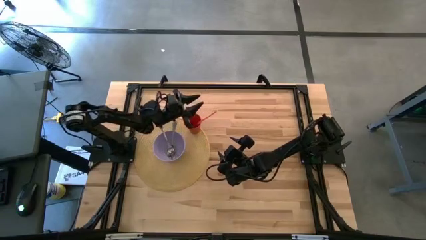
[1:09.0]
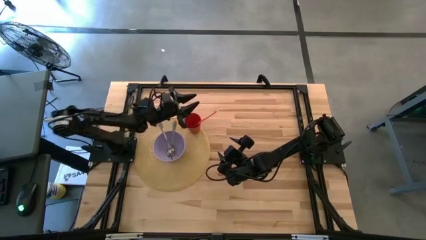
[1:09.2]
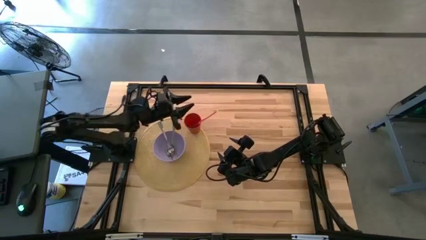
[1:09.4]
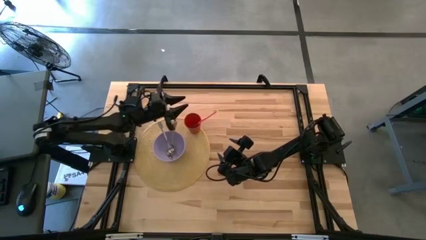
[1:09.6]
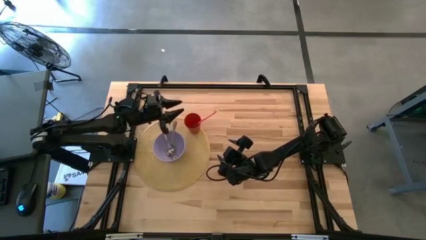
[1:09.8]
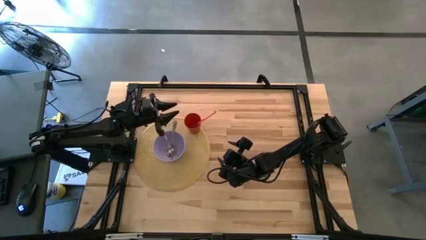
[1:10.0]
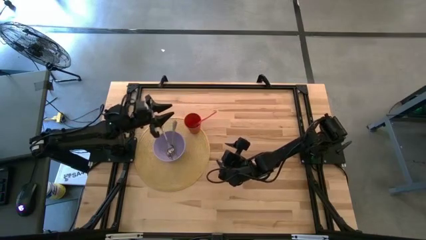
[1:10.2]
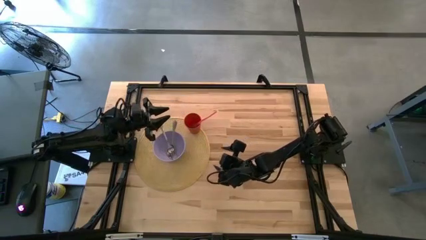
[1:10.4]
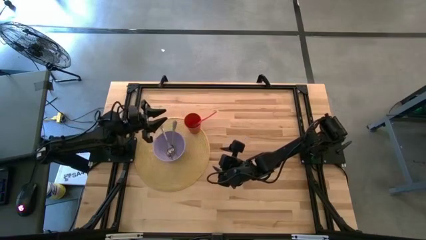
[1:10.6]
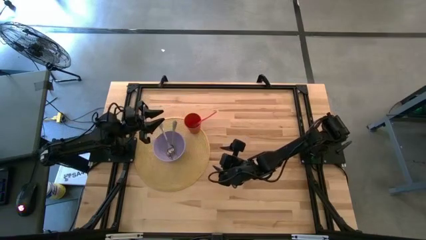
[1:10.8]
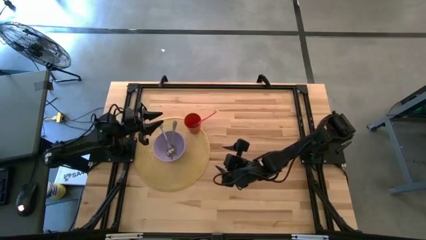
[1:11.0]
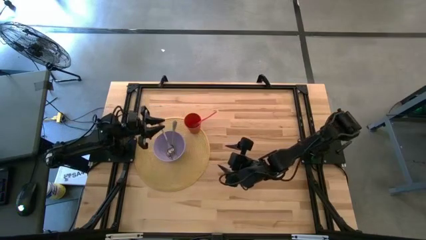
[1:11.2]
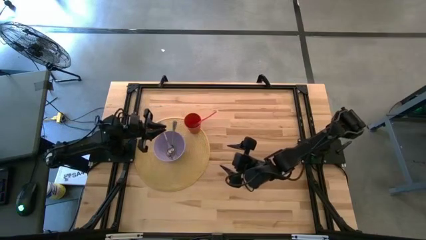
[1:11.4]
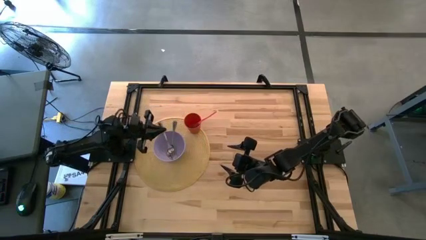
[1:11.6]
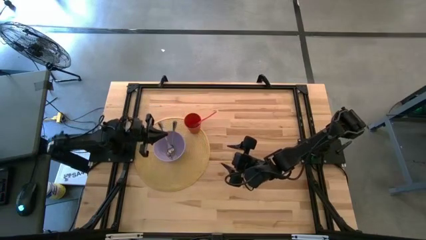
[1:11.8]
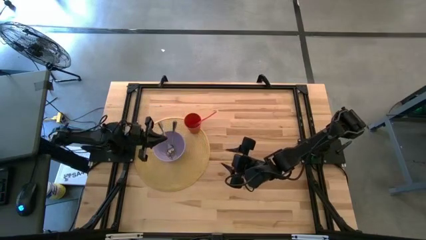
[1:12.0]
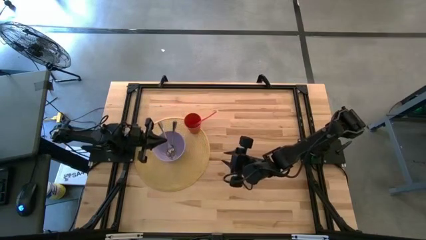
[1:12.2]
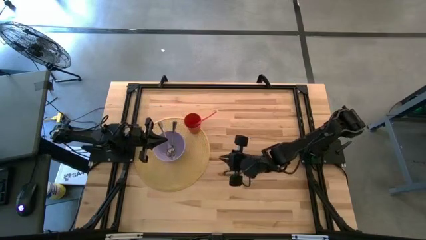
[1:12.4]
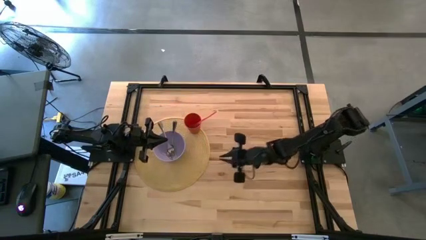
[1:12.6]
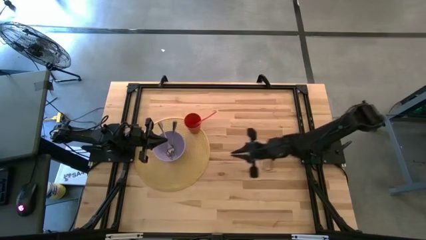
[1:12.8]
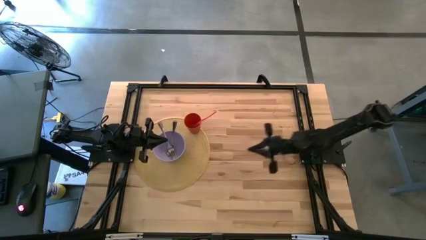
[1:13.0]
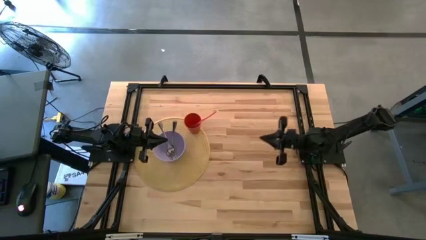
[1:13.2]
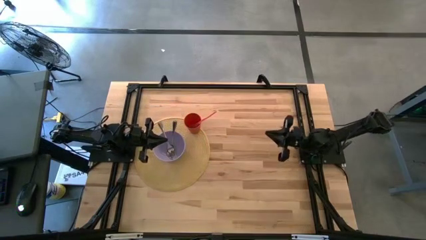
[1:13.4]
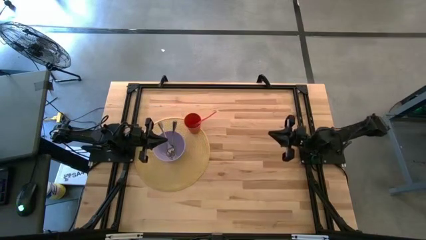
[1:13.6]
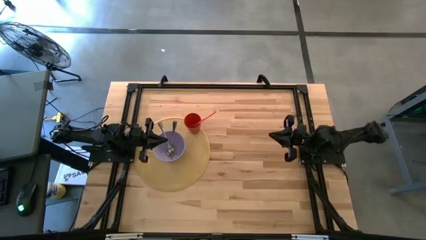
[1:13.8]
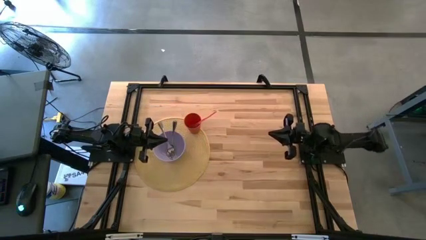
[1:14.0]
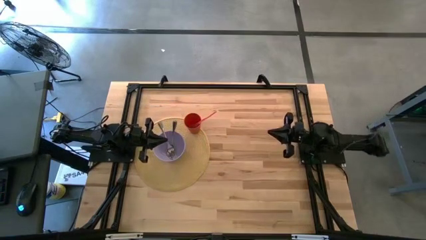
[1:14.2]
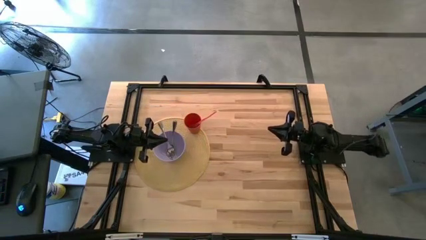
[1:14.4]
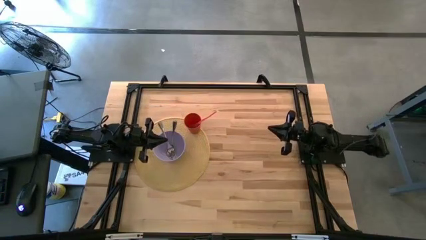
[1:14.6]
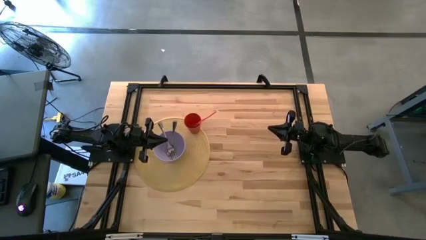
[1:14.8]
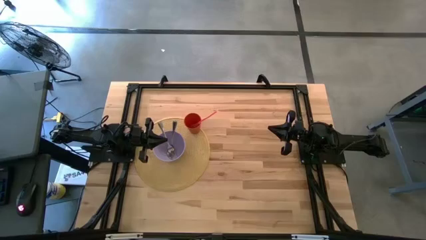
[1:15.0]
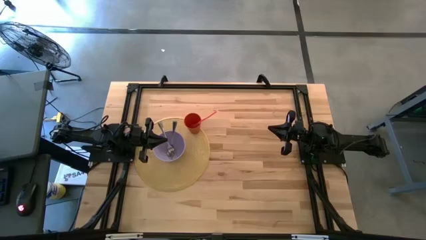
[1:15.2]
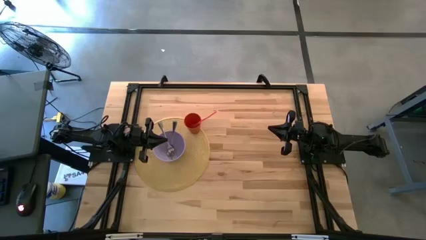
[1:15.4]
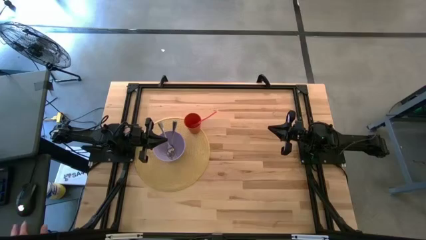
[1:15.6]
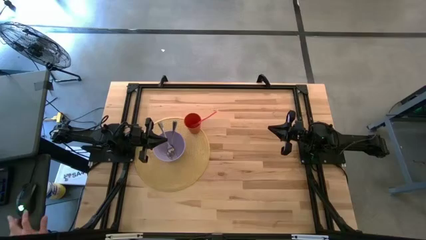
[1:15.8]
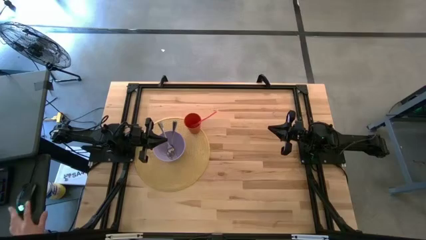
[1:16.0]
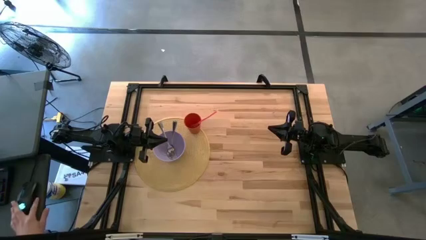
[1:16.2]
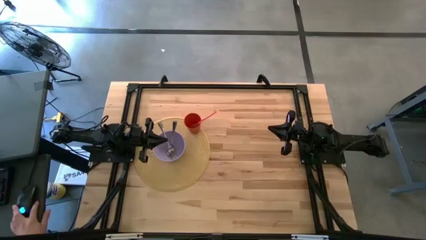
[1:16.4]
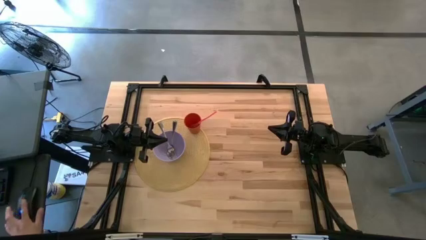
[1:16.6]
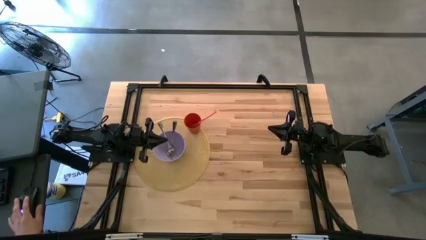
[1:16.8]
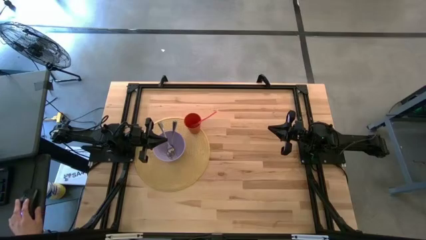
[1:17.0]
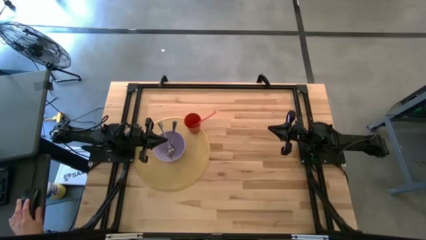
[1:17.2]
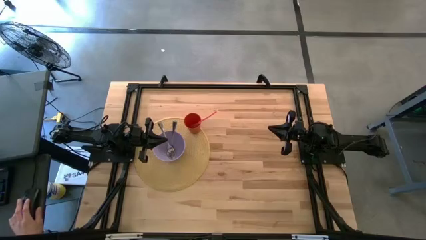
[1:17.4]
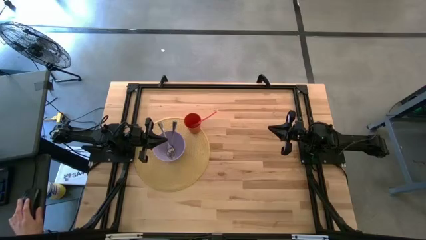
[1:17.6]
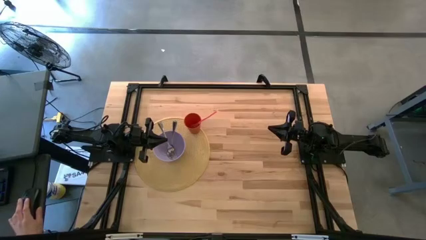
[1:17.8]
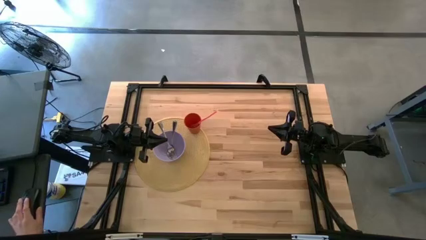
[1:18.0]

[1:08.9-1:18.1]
Task: Pick & Place Utensil
Return to Home Position

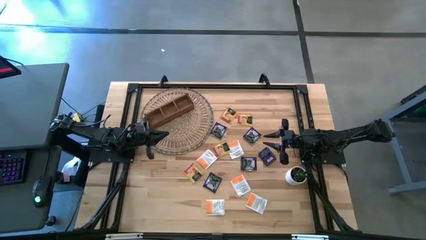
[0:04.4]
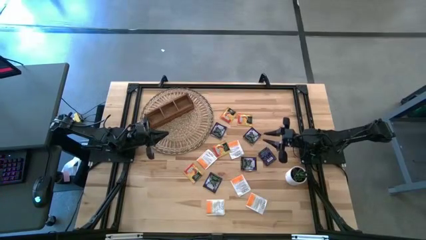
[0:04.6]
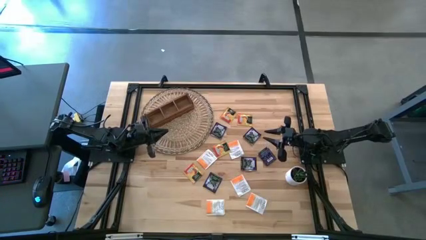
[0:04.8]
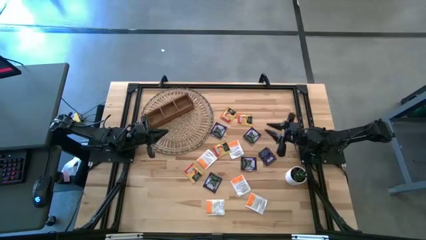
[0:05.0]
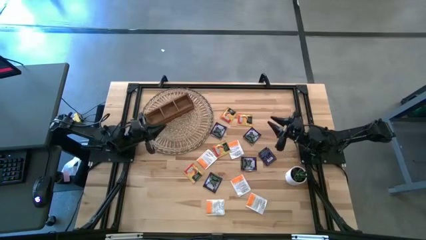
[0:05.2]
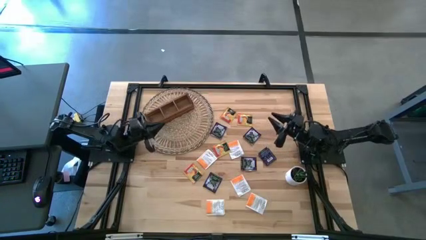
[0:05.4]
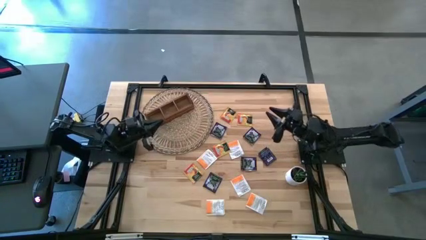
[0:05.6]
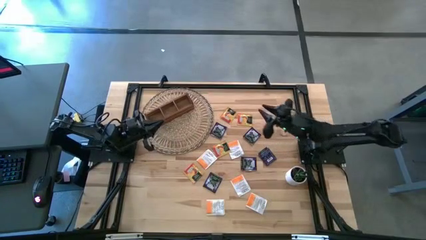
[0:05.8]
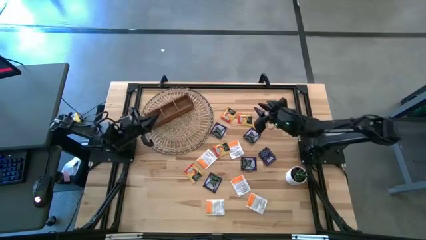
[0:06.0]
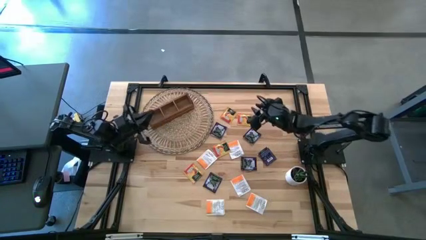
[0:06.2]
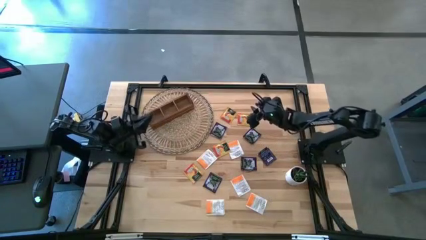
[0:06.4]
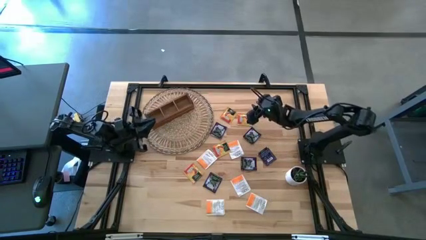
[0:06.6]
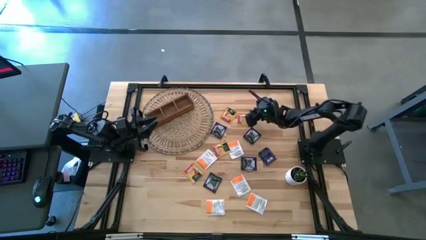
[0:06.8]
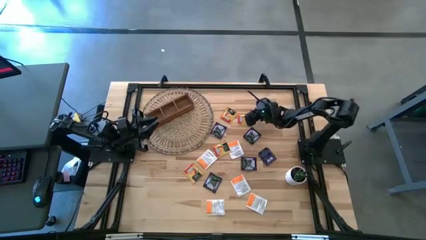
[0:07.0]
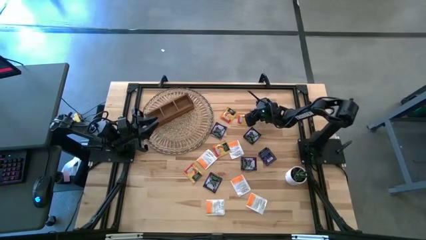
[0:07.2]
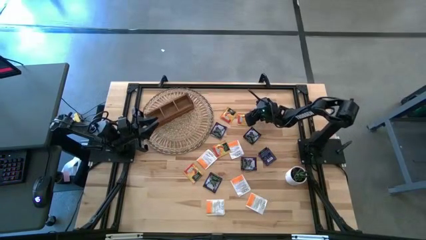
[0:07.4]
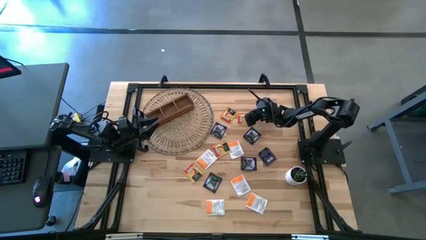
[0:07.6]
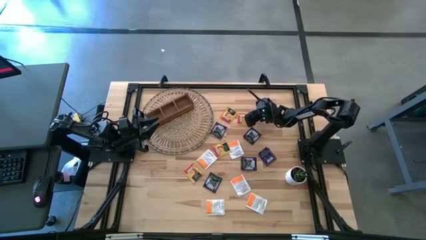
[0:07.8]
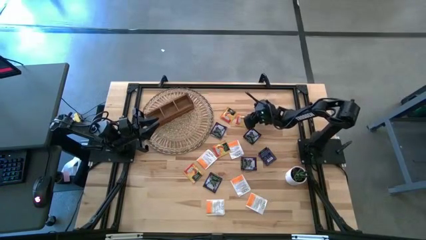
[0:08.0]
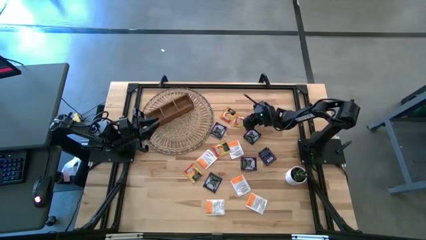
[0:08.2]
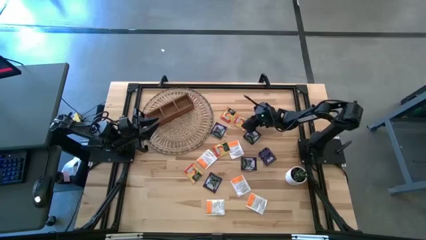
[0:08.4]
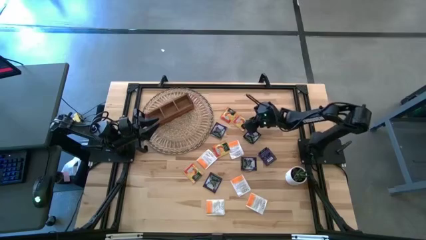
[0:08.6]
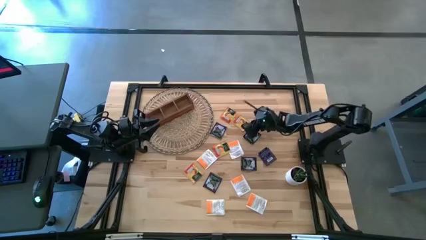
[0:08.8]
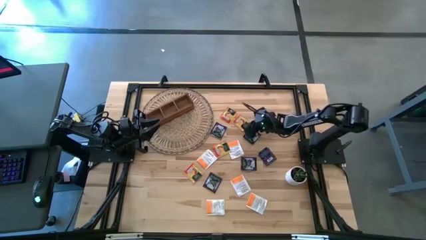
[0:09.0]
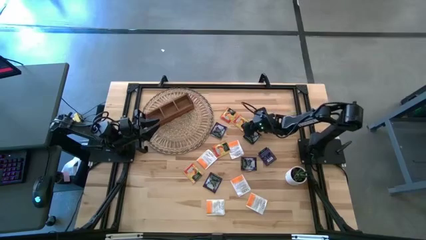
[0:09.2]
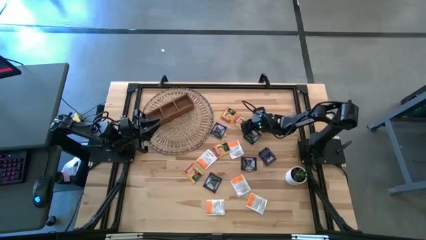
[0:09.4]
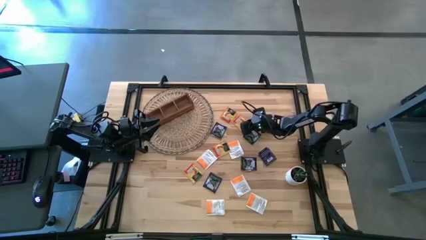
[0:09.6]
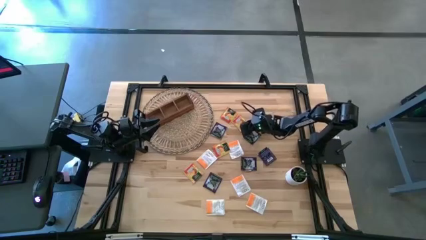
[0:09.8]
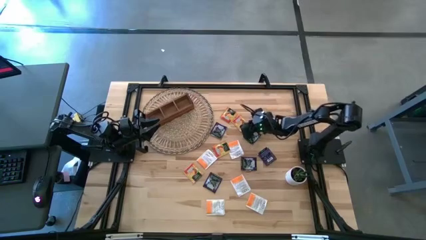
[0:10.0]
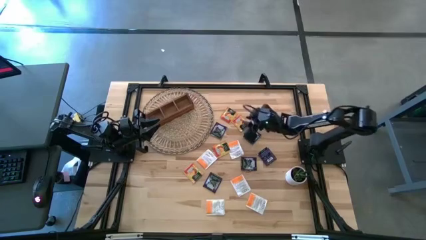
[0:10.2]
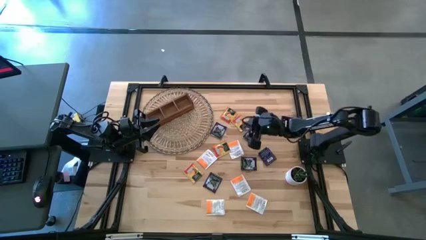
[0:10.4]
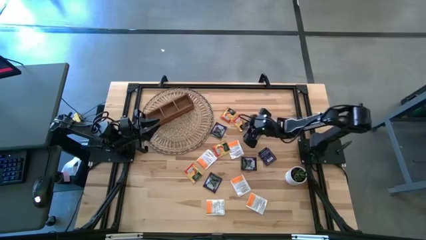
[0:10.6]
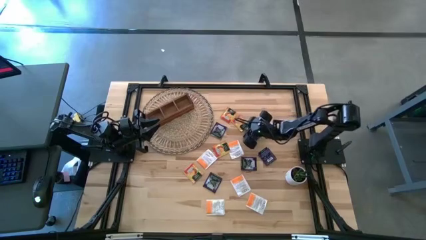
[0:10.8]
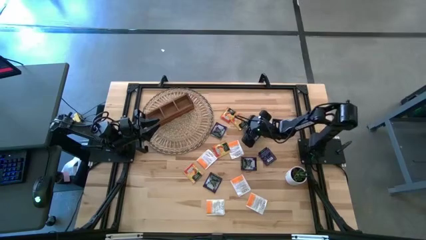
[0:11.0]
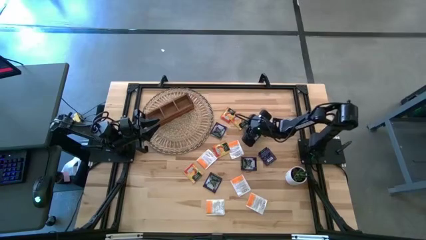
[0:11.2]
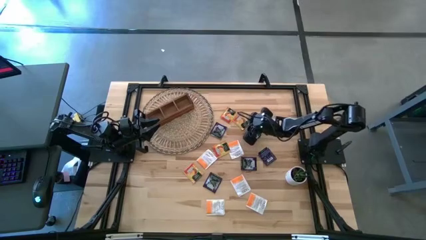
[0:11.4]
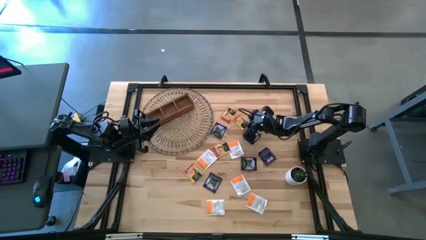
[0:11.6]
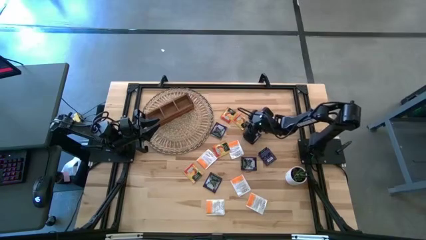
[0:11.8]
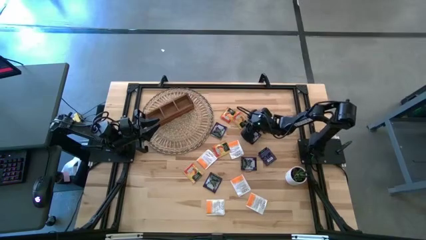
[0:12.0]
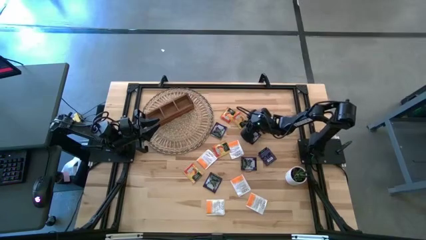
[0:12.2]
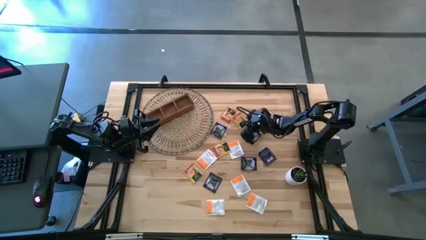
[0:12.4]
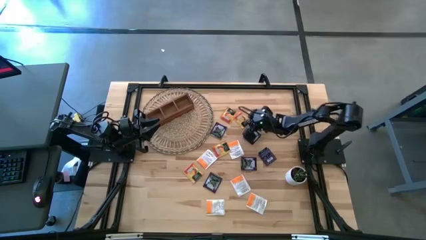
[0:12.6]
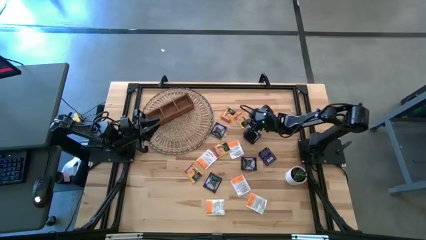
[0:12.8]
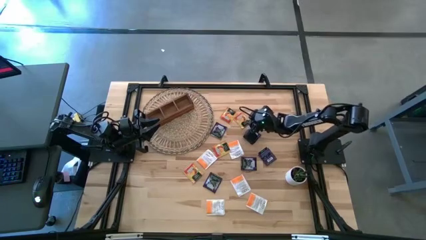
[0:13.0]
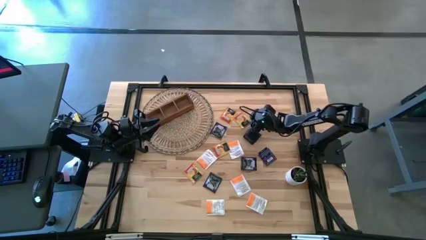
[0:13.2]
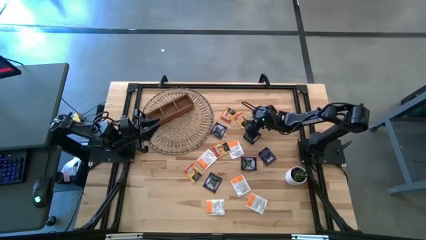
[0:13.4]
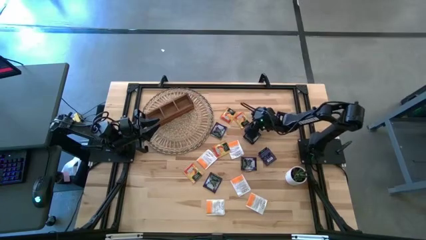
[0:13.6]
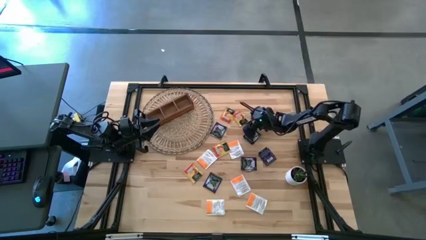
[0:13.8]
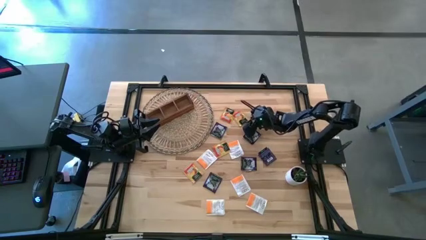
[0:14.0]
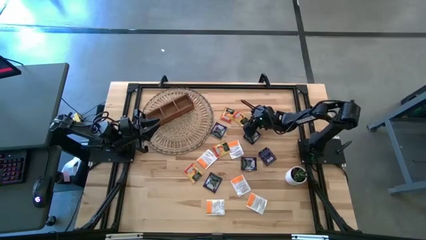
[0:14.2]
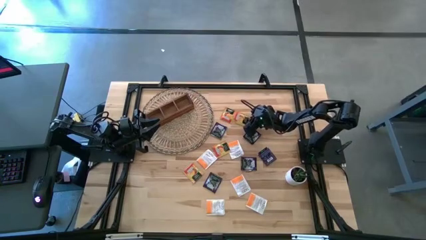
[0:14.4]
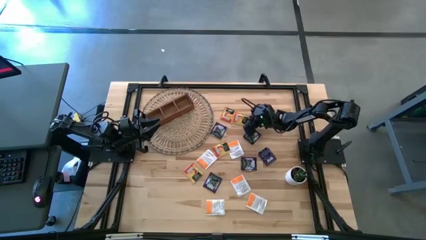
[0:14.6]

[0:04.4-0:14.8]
Task: Pick & Place Tea
Put the yellow tea bag into the right section of the wooden organizer
